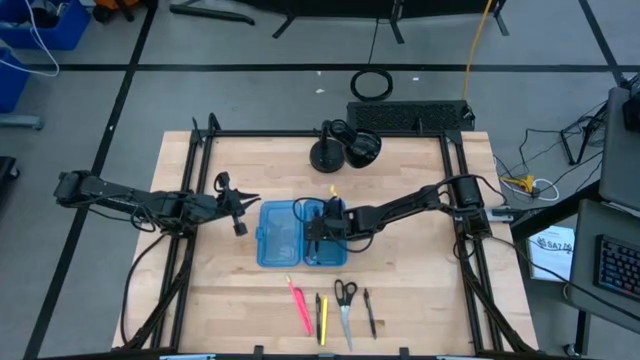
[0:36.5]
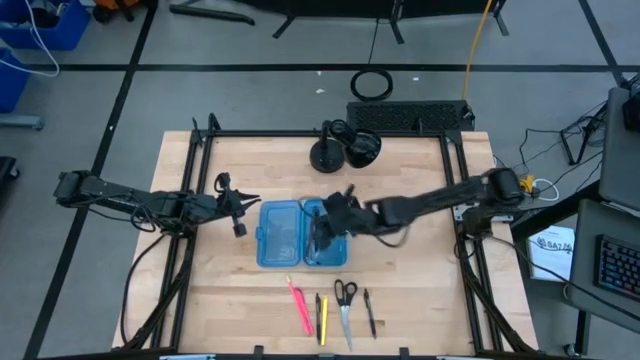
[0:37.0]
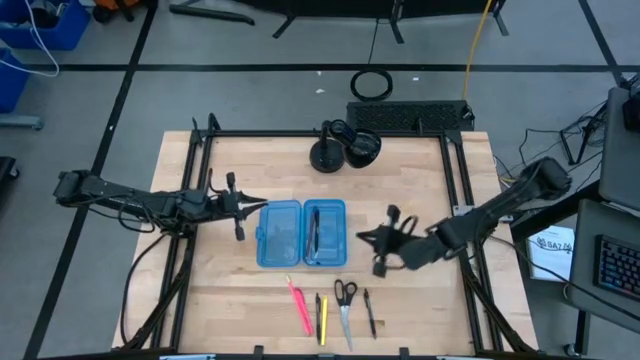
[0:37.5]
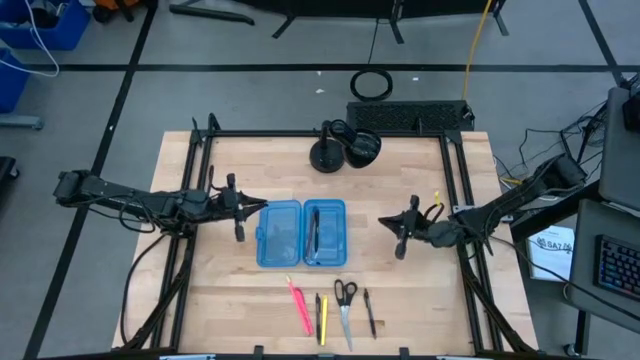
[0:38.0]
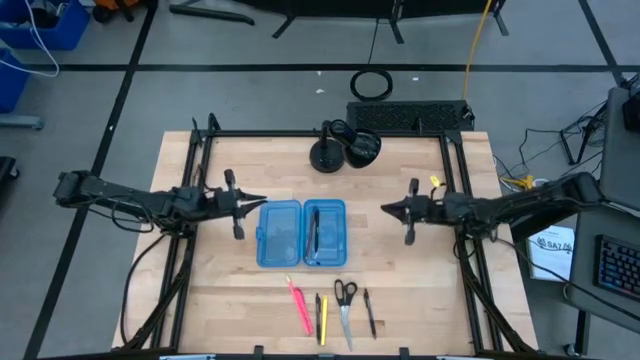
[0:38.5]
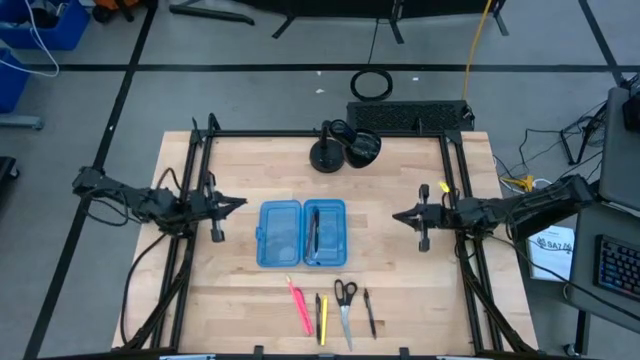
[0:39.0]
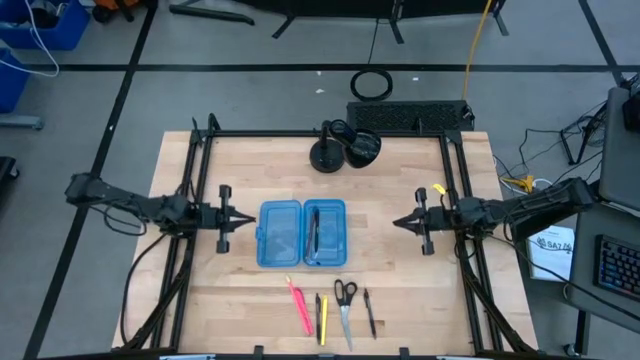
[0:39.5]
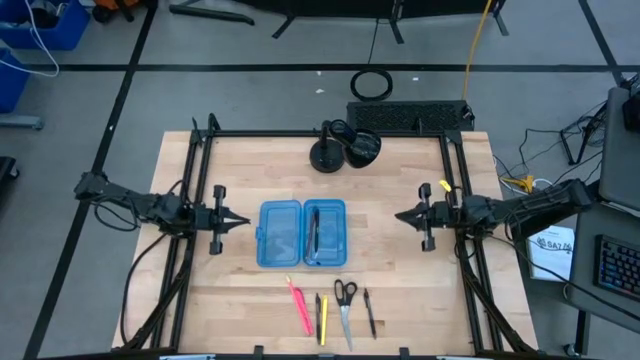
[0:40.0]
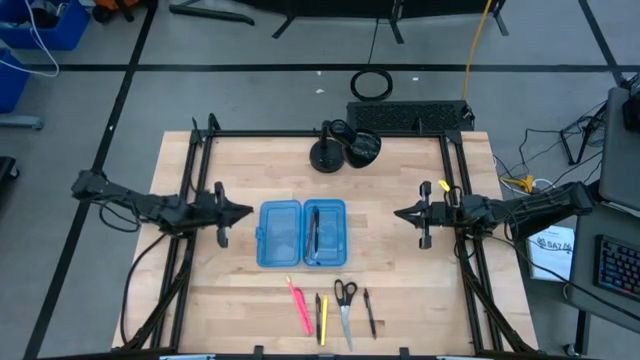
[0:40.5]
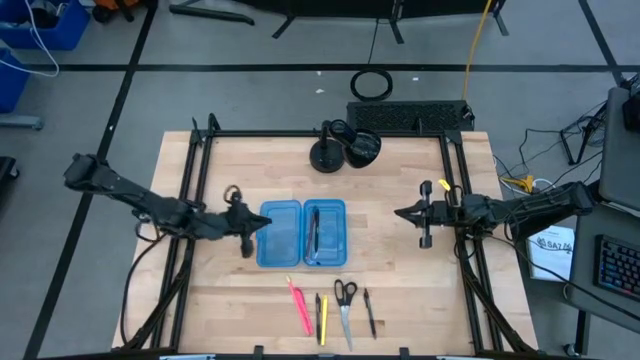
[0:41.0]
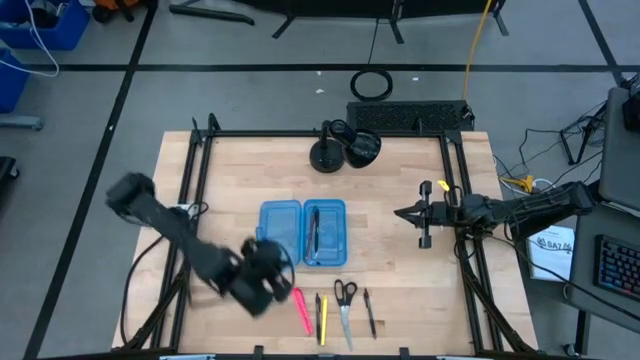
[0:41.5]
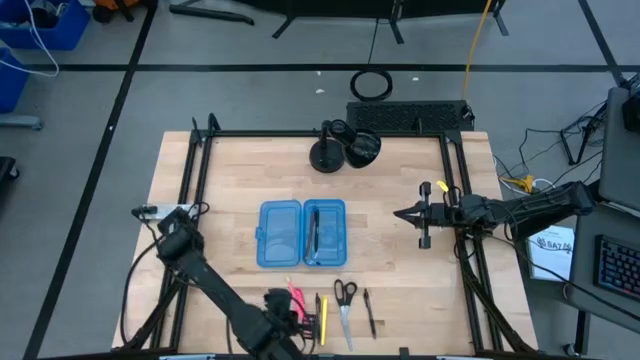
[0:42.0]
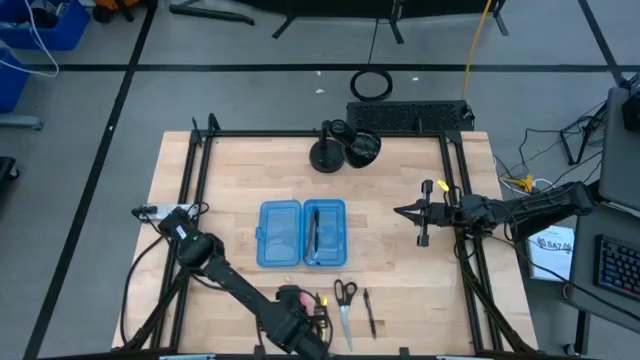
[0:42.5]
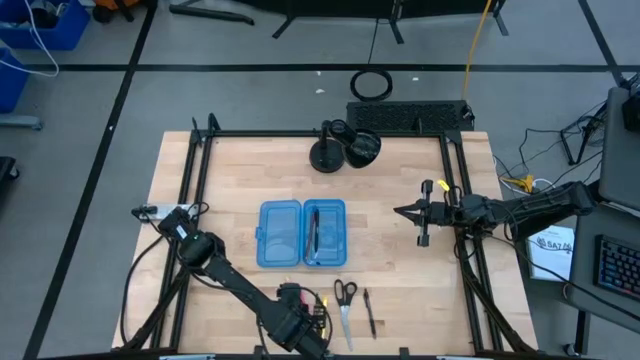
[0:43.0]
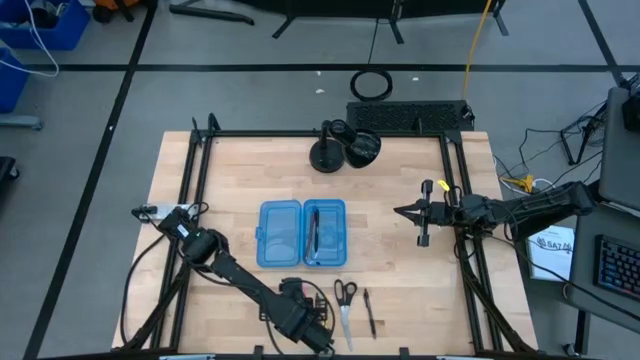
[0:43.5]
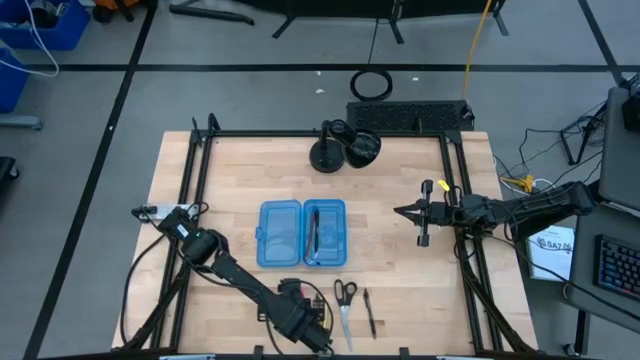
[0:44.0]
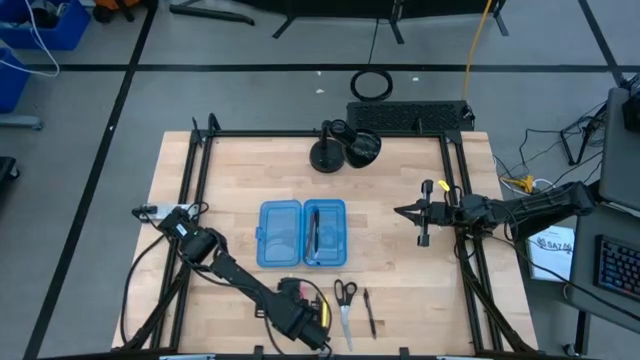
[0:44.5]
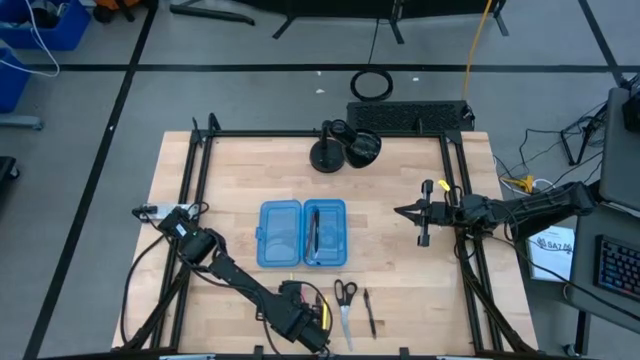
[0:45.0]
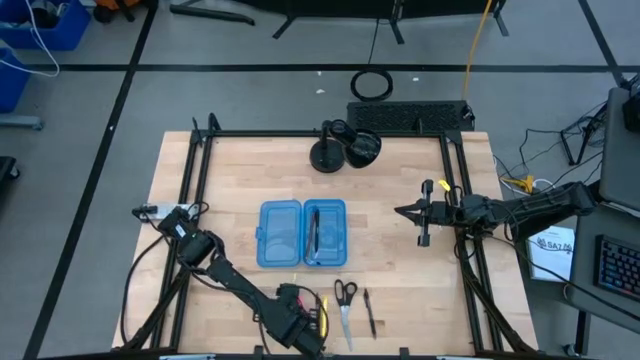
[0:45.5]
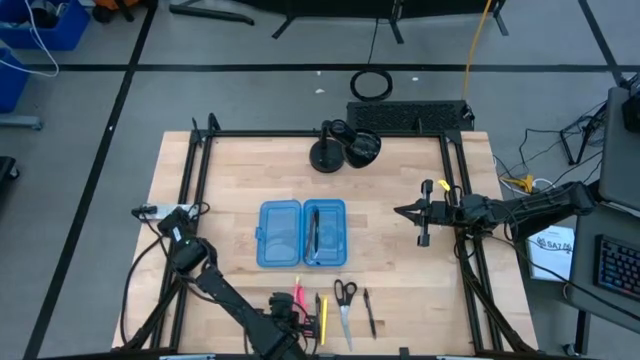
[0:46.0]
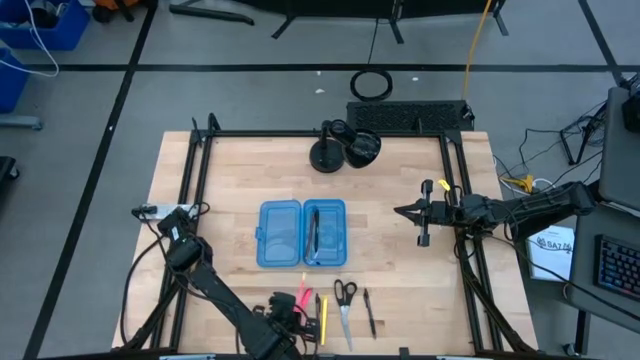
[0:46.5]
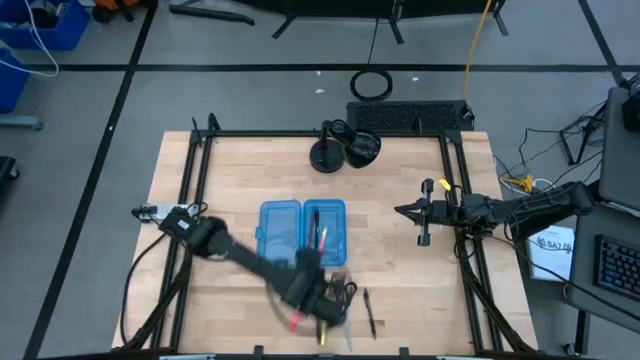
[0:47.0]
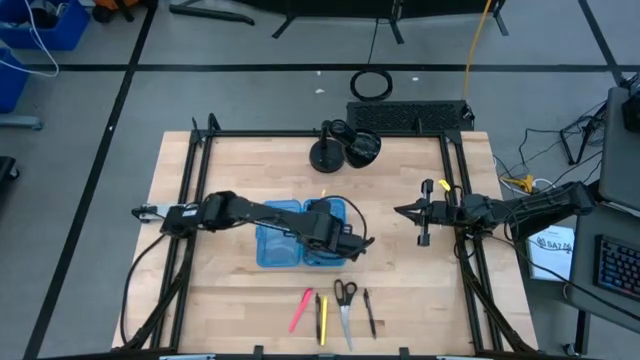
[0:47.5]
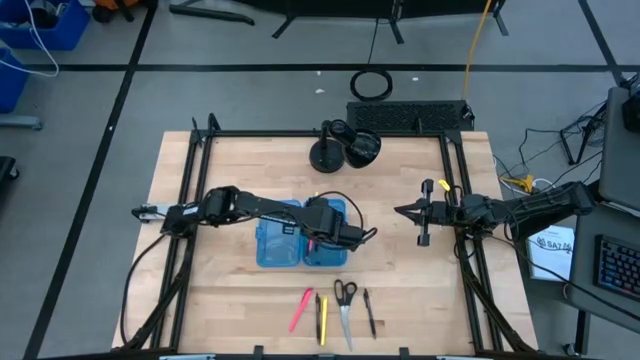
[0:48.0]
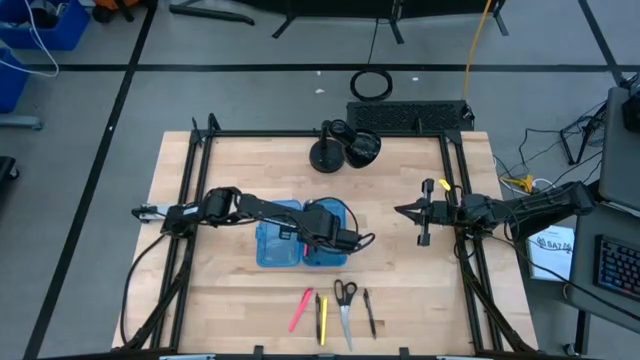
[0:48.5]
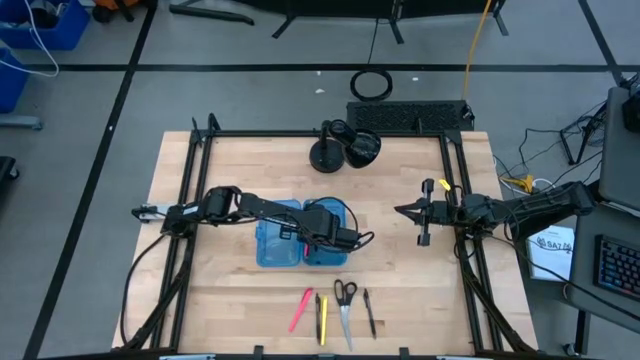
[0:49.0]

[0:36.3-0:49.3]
Task: Pick & place school supplies into a supply box
Put the pink pencil into the blue supply box

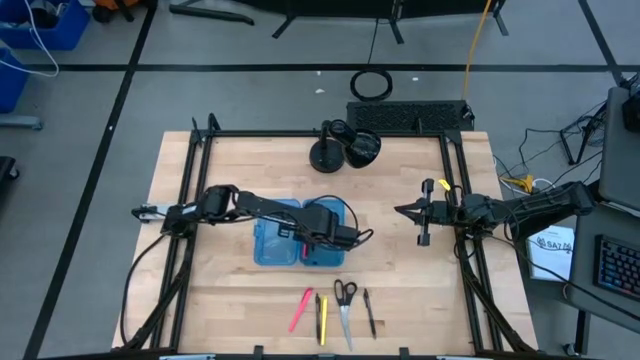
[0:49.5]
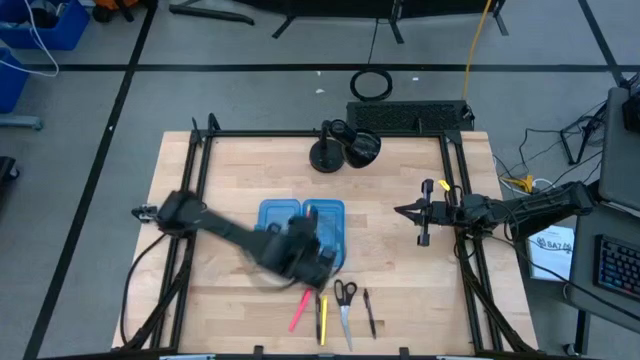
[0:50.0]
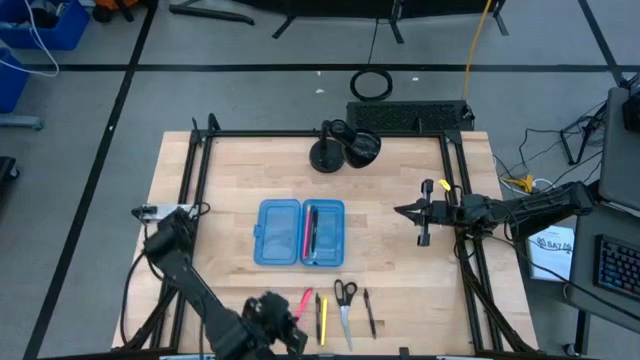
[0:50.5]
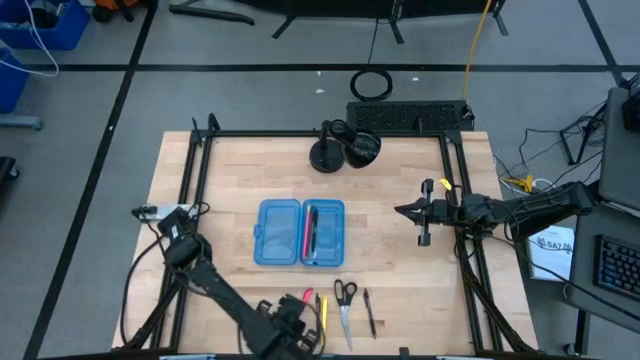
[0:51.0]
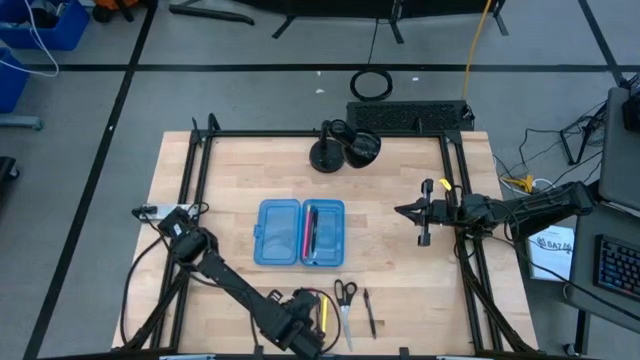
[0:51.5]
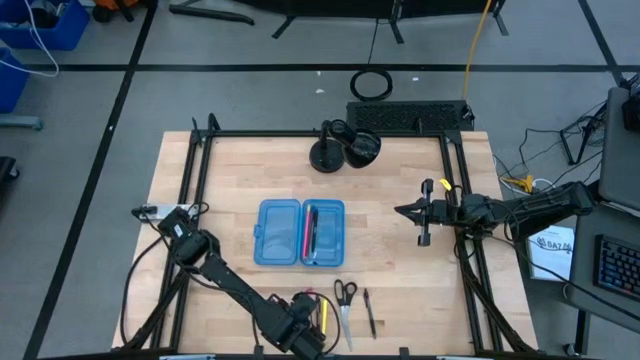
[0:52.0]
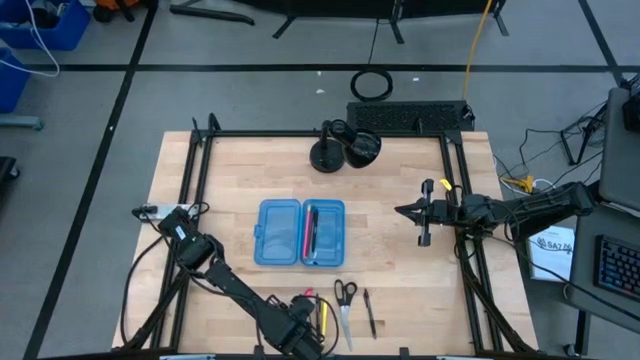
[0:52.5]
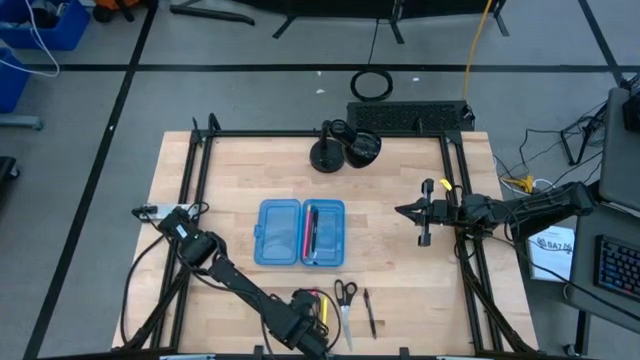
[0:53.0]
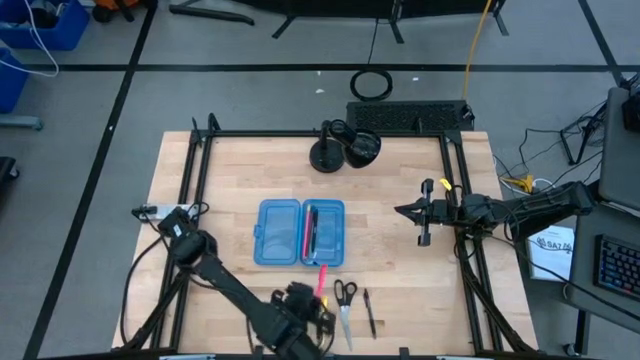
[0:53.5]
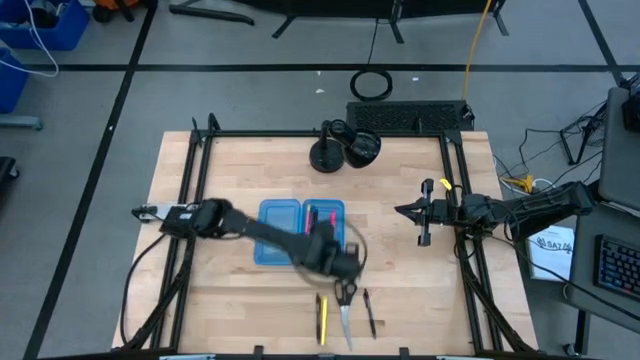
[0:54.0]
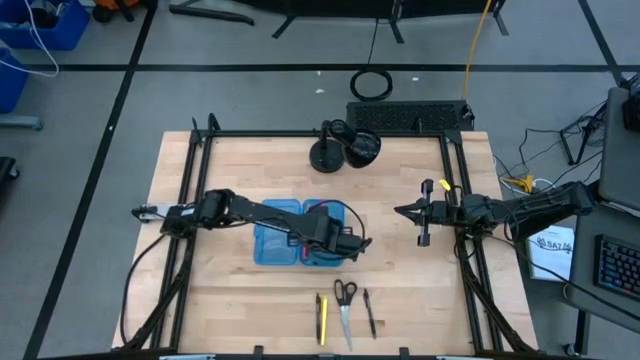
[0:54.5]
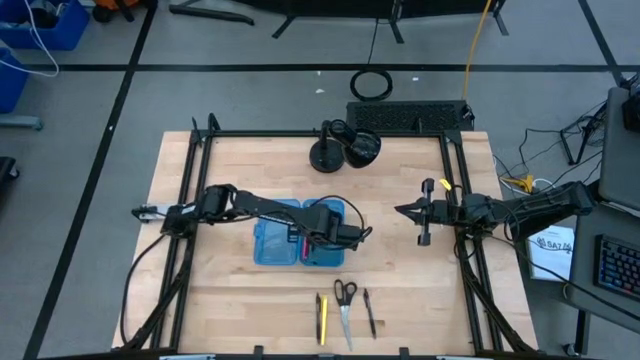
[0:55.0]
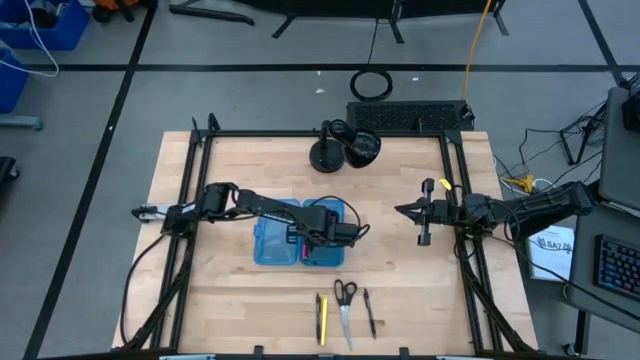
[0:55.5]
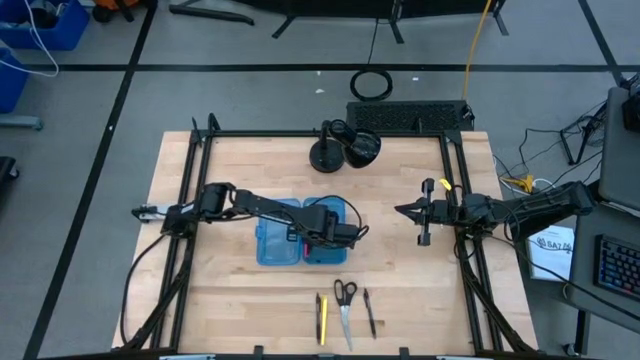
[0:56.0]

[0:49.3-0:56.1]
Put the pink pen into the blue supply box
